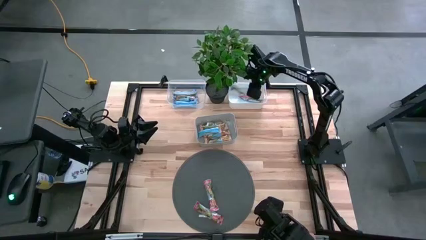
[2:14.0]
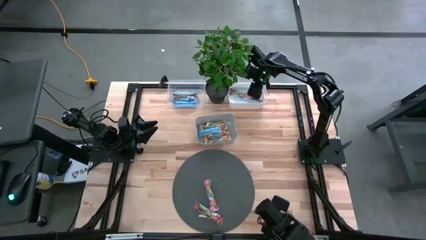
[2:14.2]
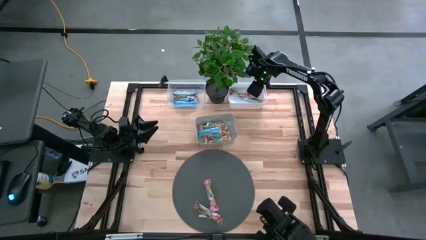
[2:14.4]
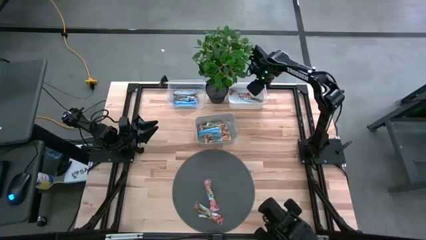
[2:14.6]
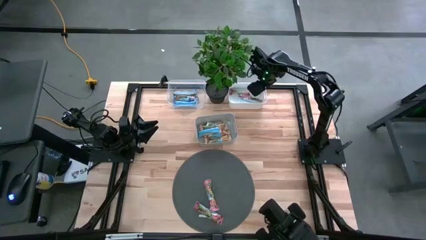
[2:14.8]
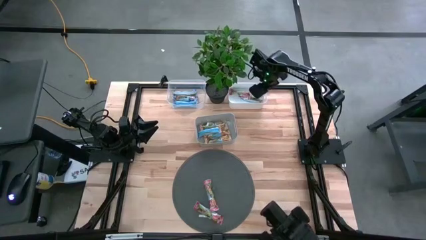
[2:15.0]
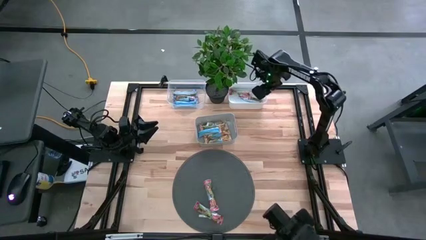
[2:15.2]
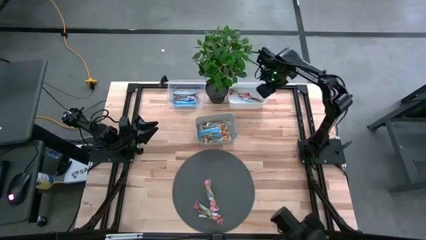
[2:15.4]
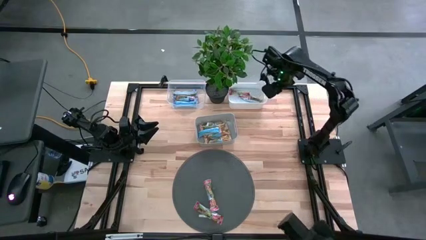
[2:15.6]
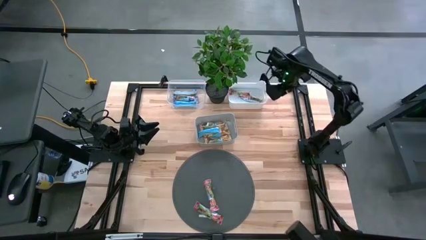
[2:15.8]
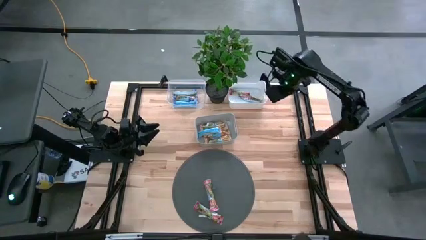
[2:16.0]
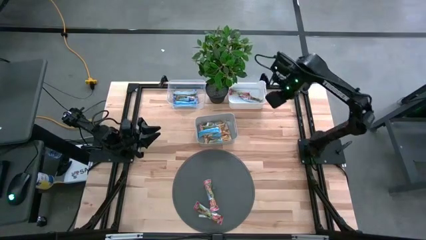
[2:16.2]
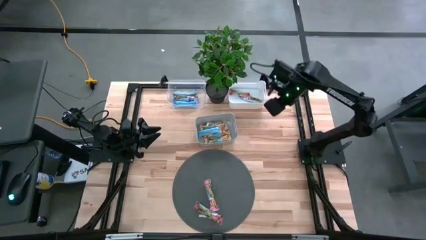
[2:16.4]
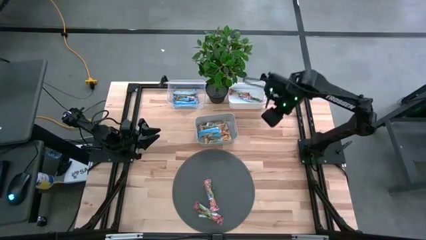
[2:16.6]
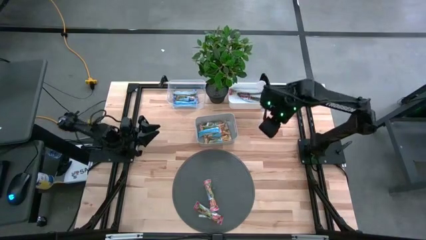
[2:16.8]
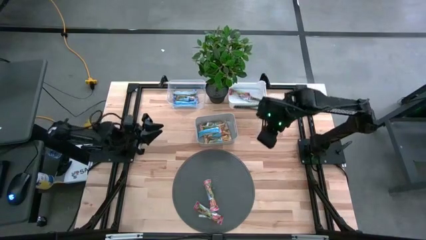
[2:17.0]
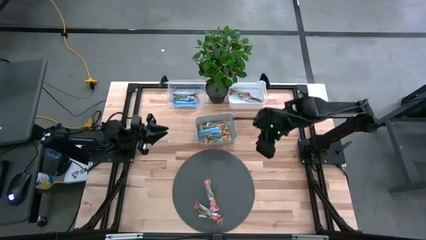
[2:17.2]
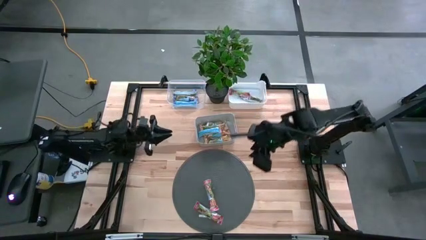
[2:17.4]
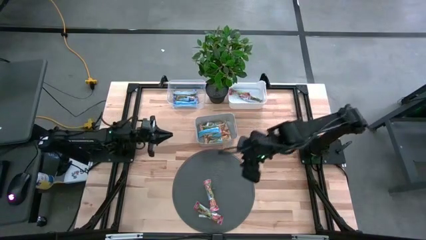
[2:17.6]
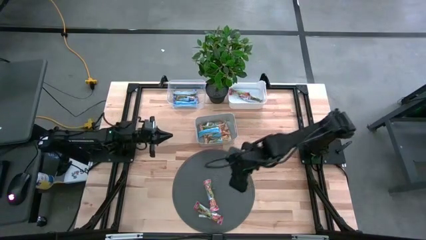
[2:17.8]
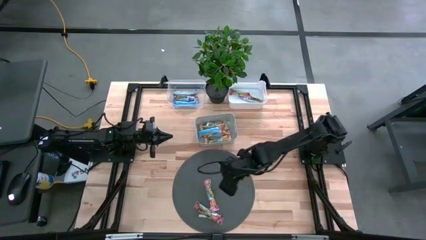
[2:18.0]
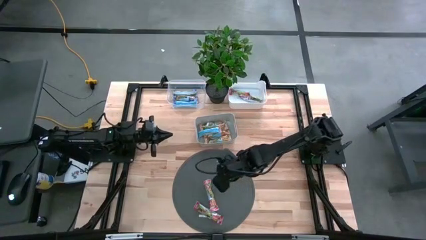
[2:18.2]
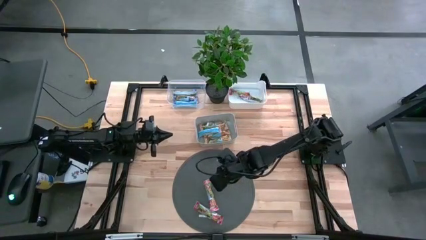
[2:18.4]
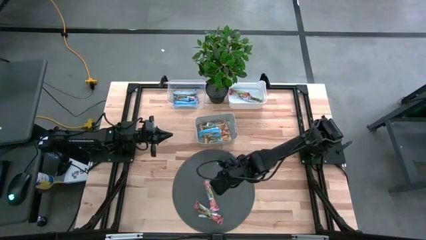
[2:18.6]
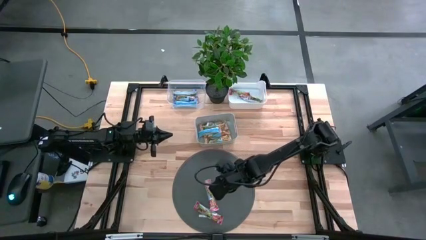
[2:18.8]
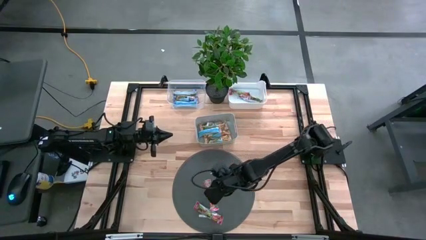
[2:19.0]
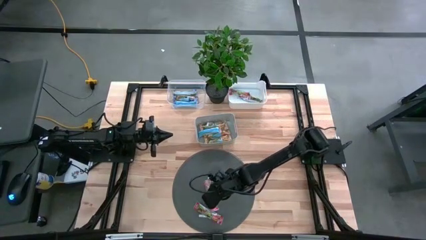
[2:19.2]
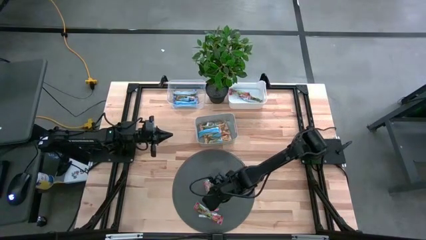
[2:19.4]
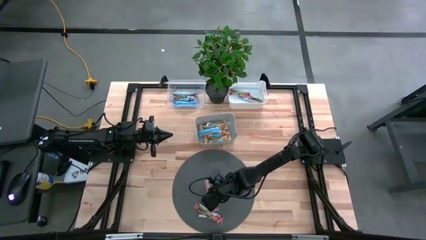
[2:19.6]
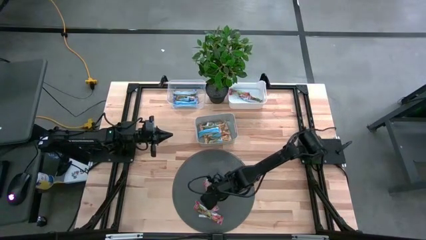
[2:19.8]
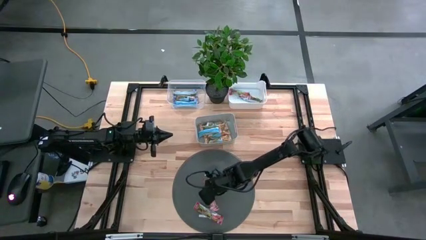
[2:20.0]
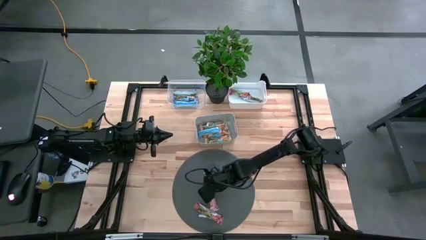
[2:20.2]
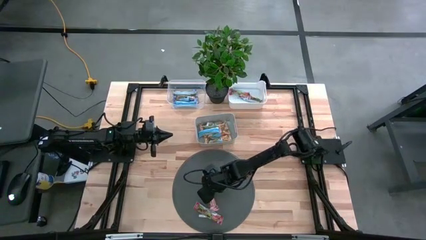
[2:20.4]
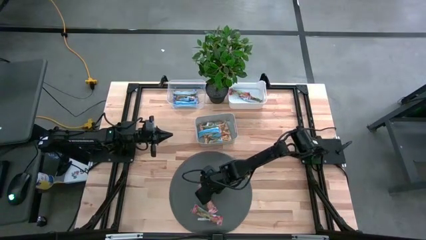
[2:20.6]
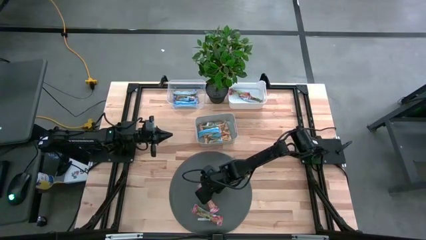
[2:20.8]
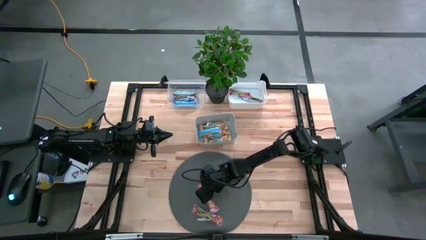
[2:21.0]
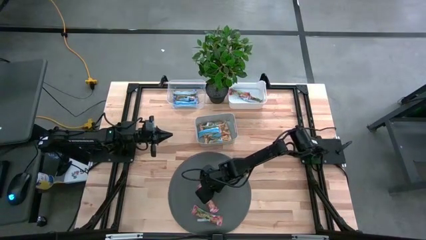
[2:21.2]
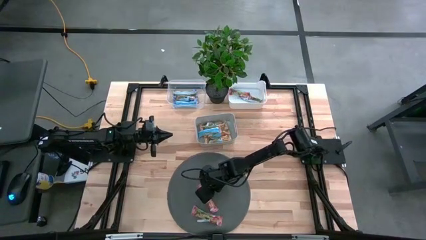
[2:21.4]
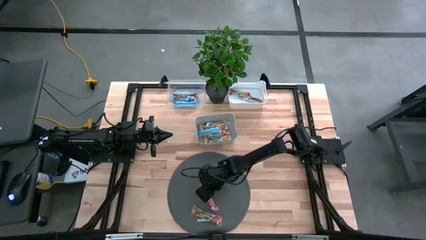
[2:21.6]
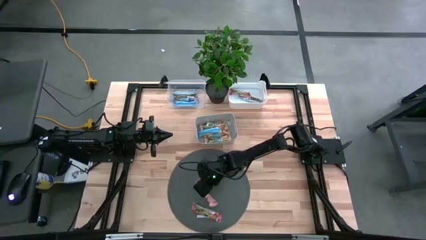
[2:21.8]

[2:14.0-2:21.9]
Task: Pick and place Granola Bars by type
Put the red granola bar into the white bin

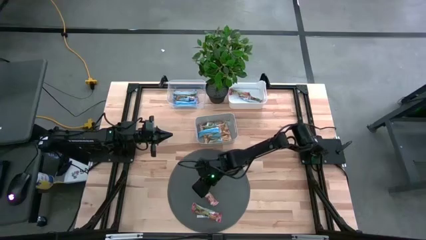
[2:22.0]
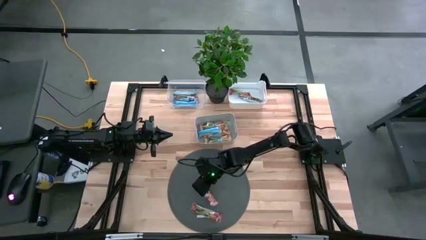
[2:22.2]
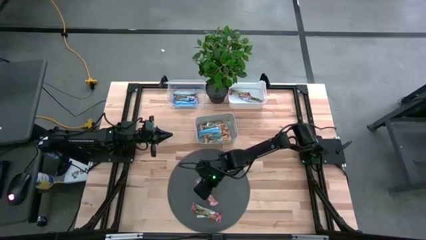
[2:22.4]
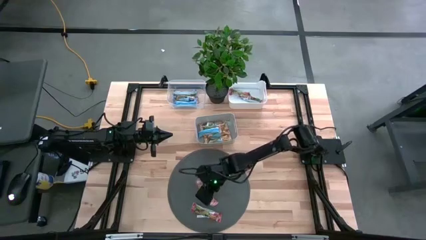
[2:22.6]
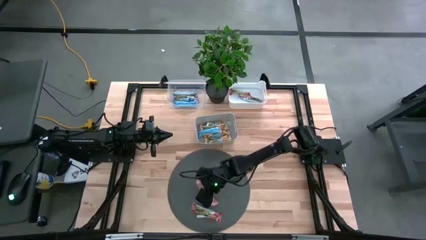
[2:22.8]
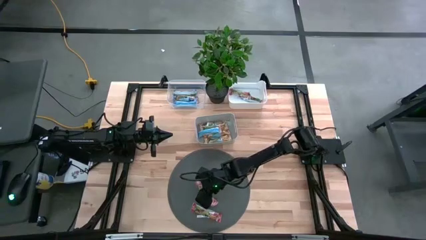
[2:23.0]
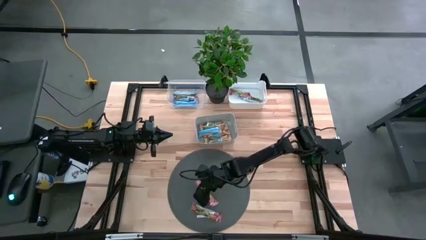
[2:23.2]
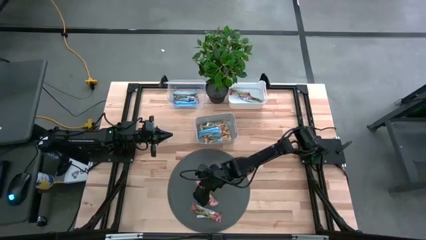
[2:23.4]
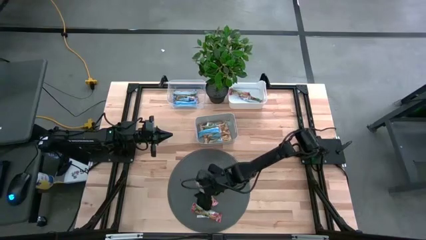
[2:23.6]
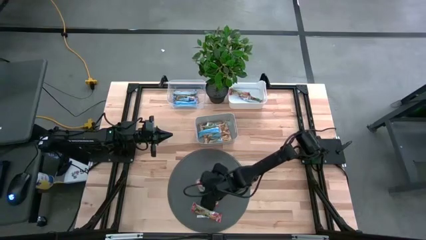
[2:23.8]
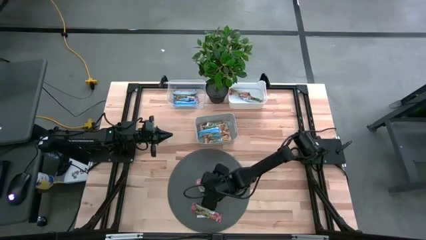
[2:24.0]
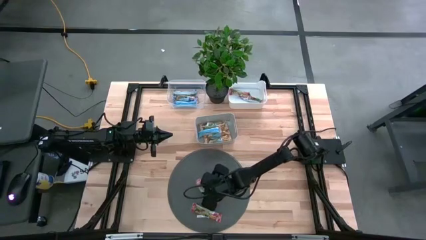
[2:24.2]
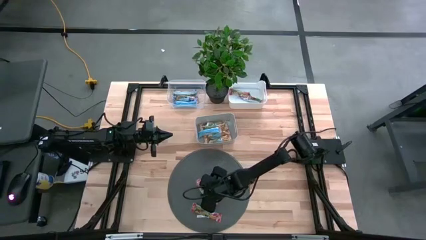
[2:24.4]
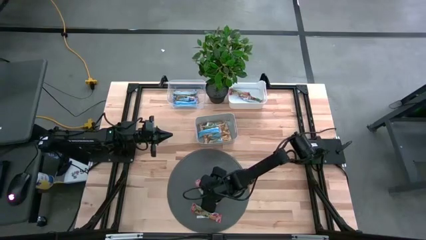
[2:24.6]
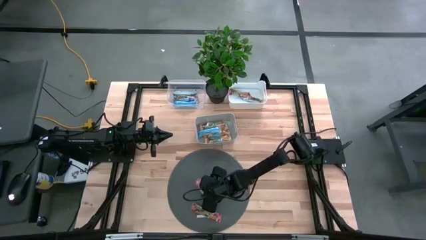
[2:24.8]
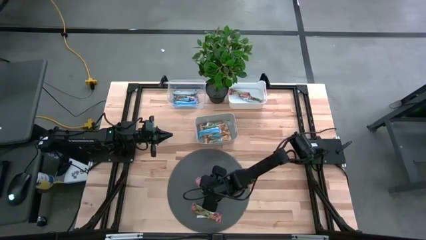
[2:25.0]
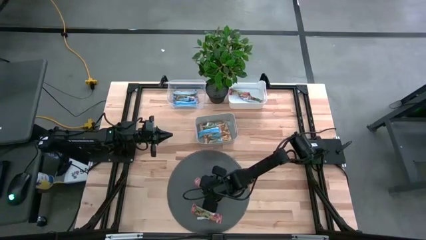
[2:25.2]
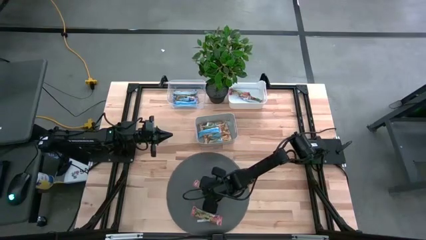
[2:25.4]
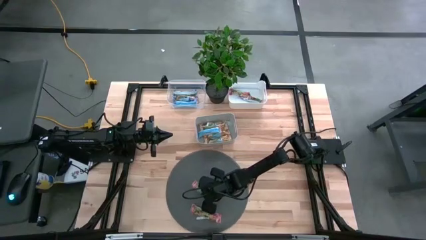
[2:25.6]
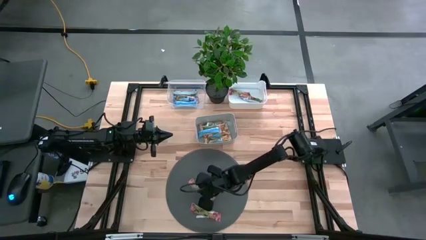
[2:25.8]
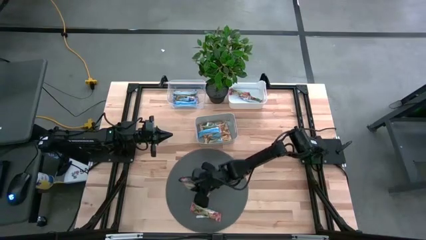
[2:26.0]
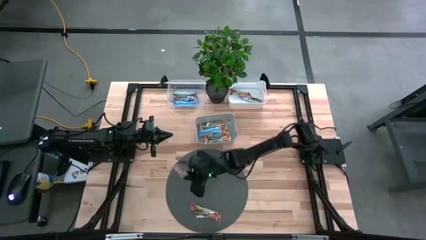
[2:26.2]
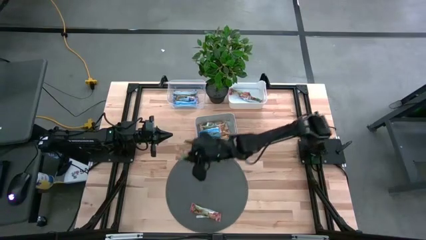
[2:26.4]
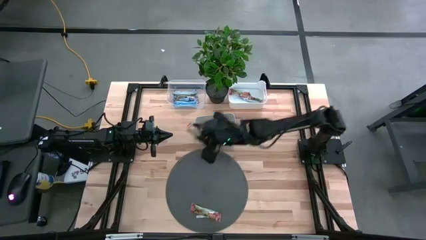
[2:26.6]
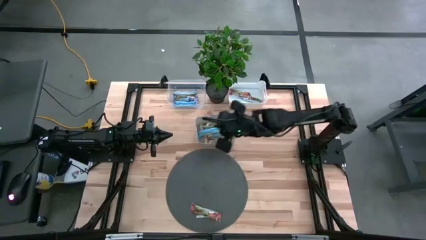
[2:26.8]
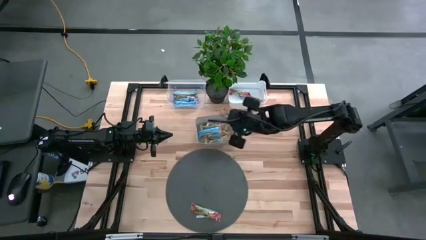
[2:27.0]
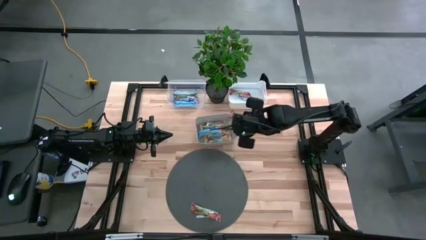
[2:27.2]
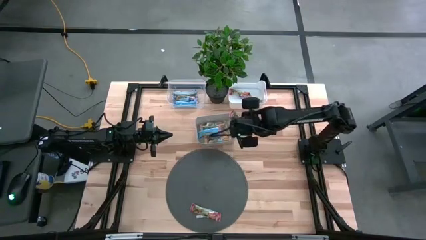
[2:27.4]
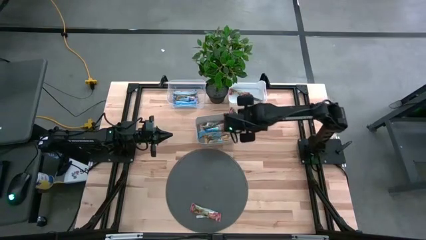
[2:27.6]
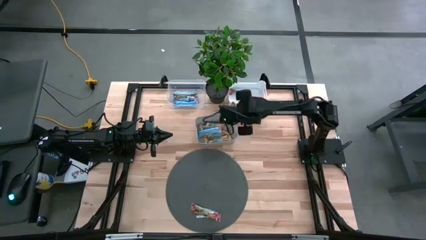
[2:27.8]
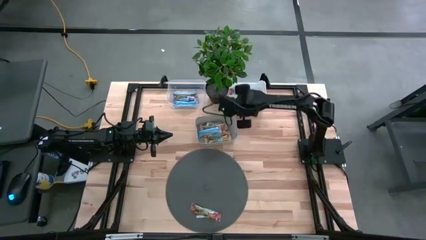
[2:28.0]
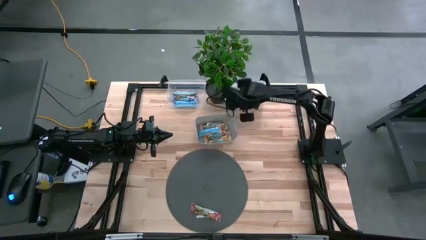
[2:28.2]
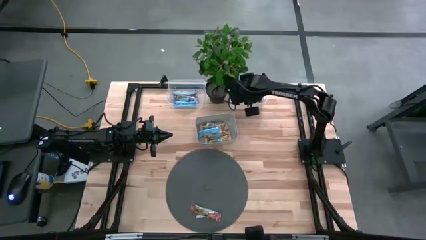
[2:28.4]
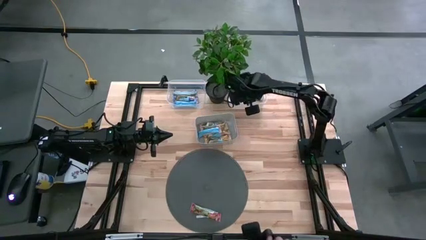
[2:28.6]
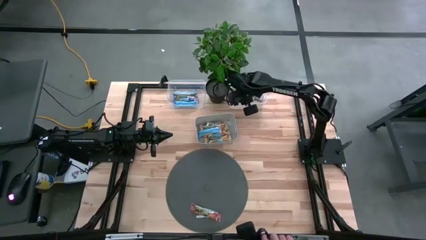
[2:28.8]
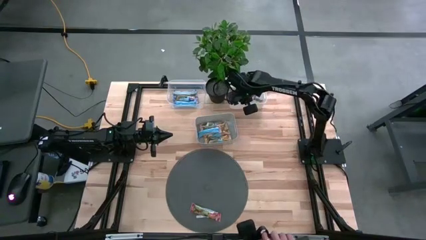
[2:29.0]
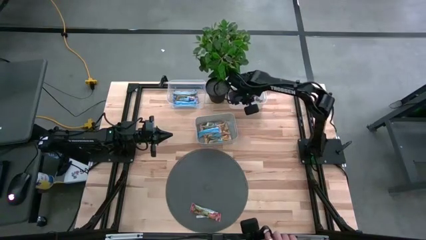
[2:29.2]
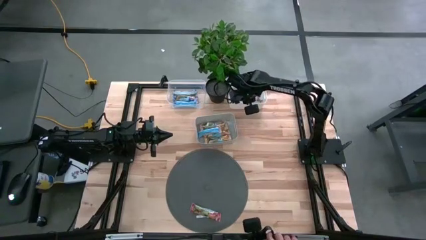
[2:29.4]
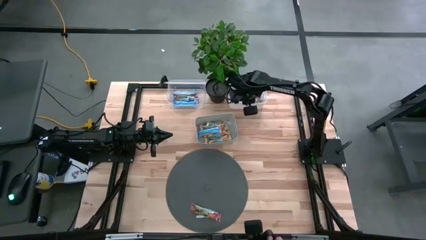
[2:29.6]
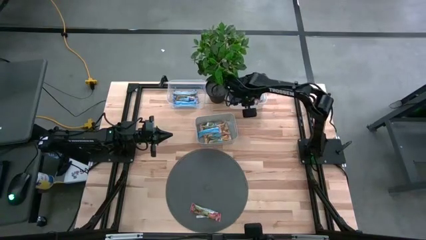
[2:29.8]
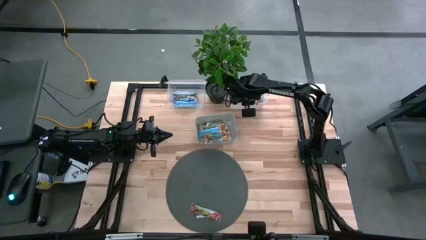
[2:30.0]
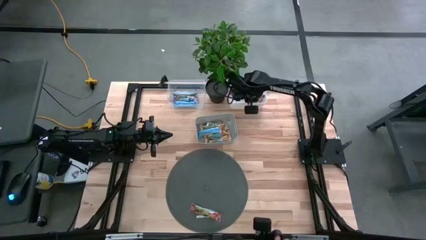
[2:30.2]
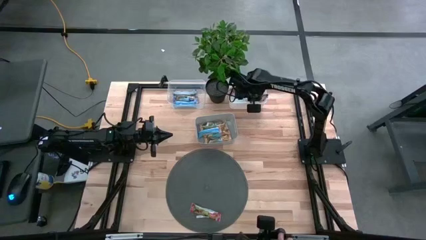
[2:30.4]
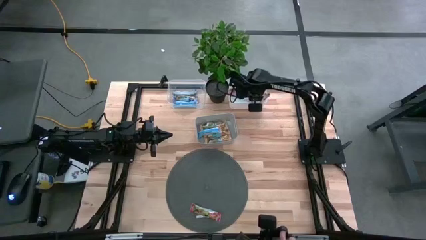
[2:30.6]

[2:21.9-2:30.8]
Put the red granola bar into the white bin
